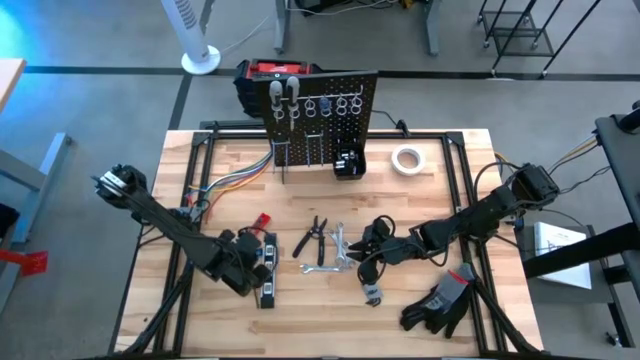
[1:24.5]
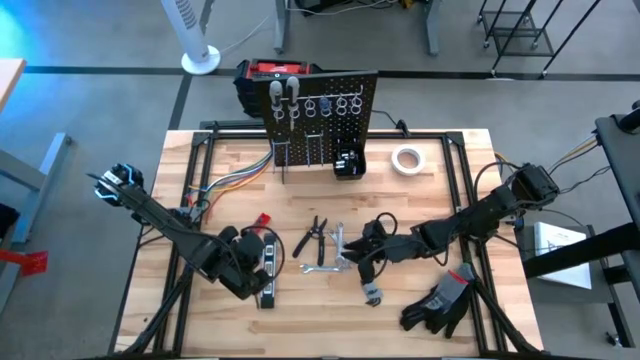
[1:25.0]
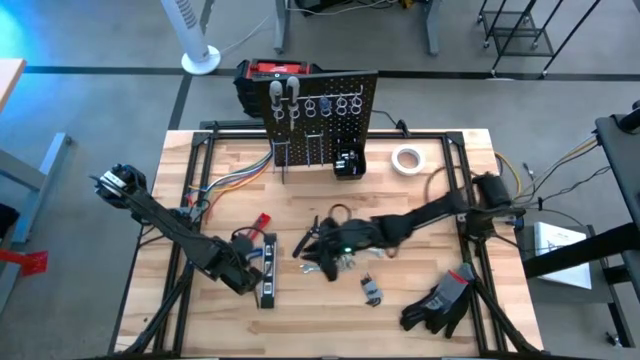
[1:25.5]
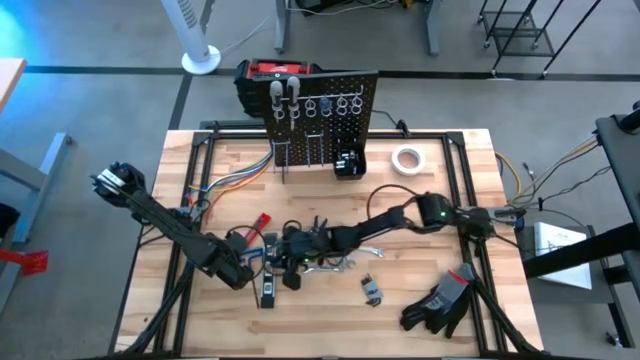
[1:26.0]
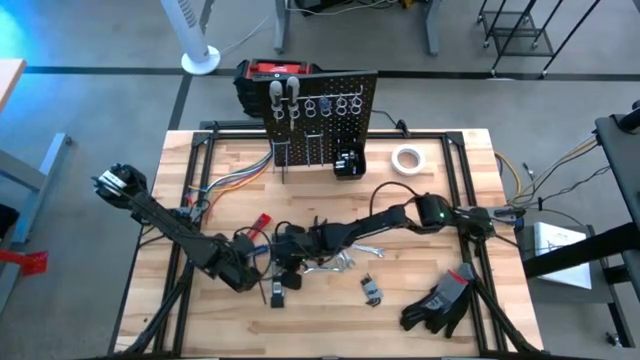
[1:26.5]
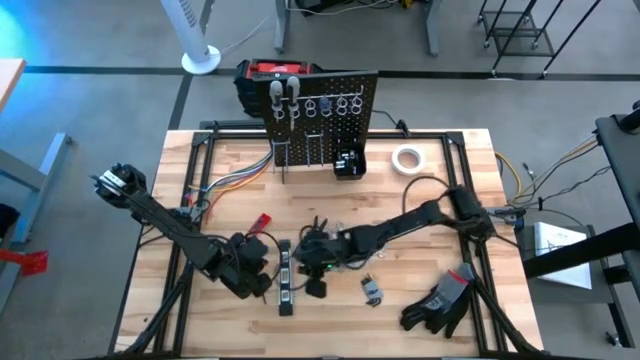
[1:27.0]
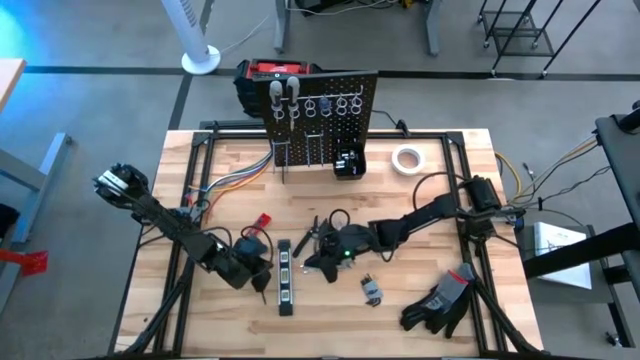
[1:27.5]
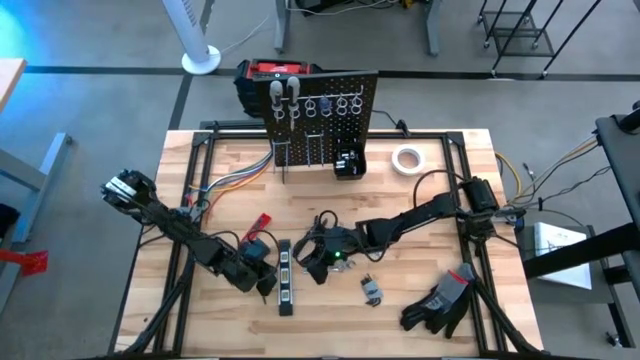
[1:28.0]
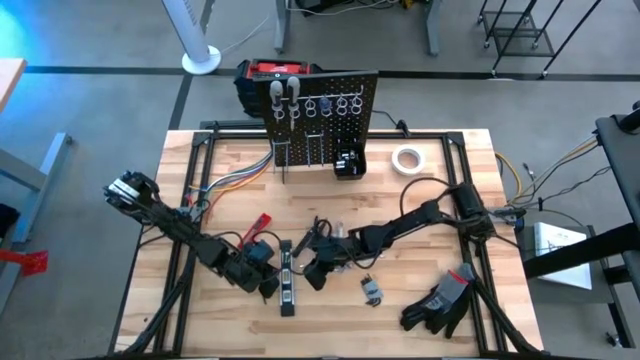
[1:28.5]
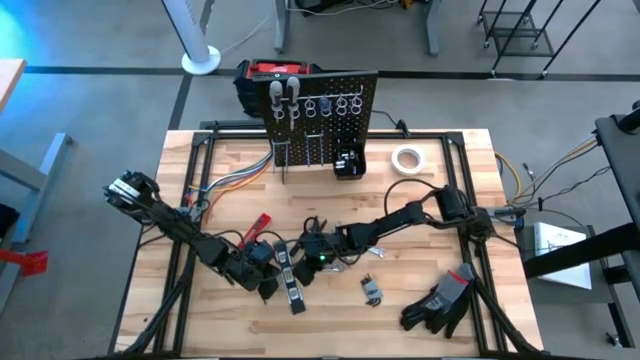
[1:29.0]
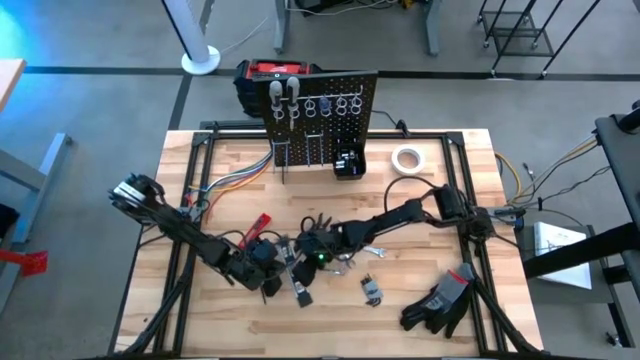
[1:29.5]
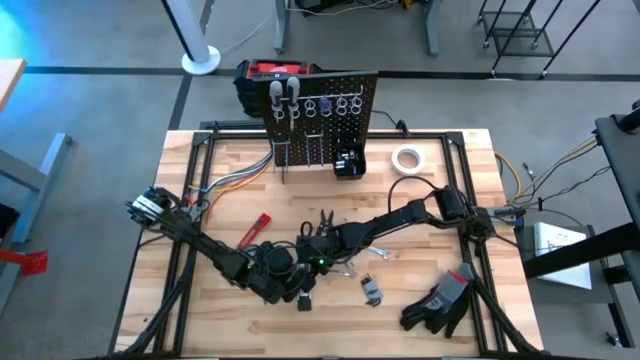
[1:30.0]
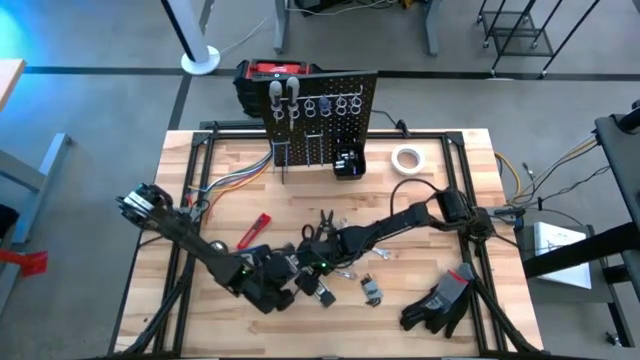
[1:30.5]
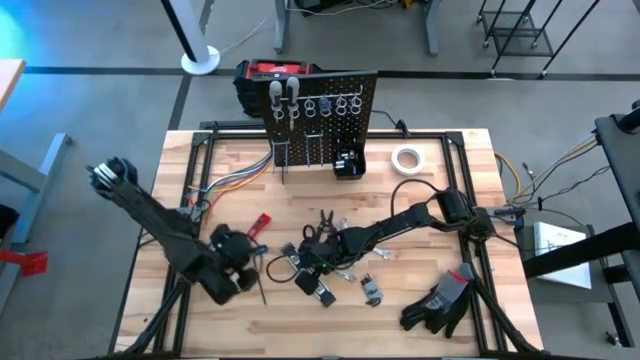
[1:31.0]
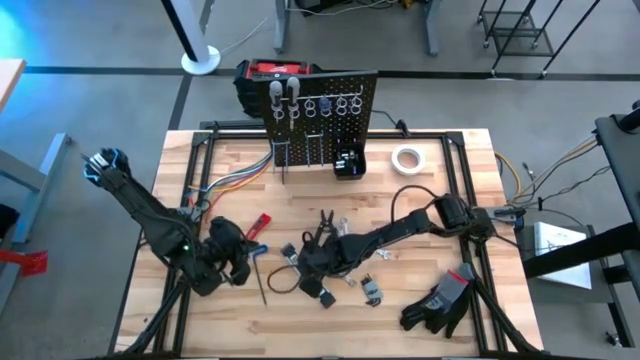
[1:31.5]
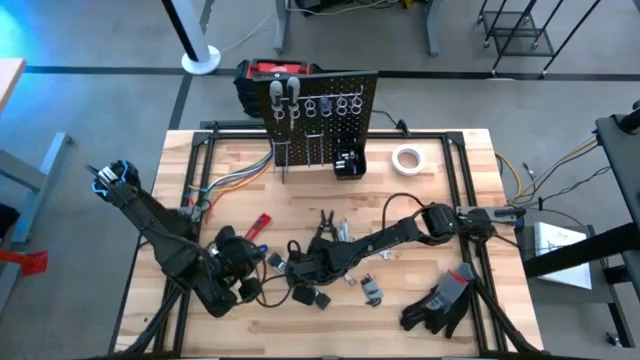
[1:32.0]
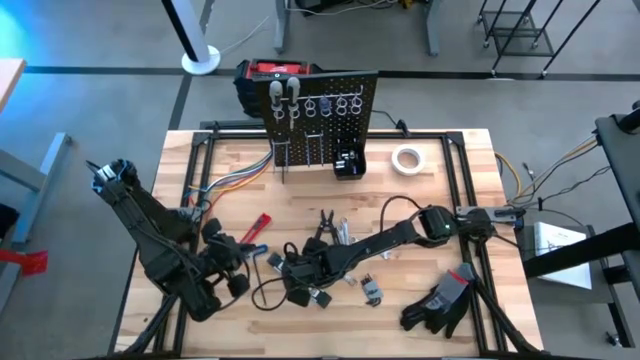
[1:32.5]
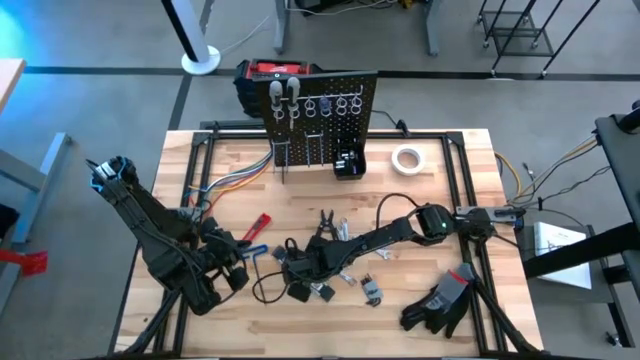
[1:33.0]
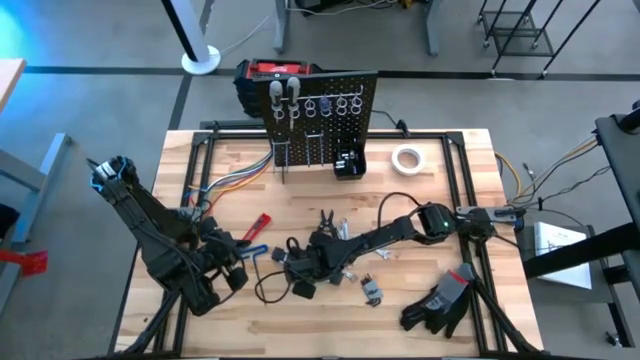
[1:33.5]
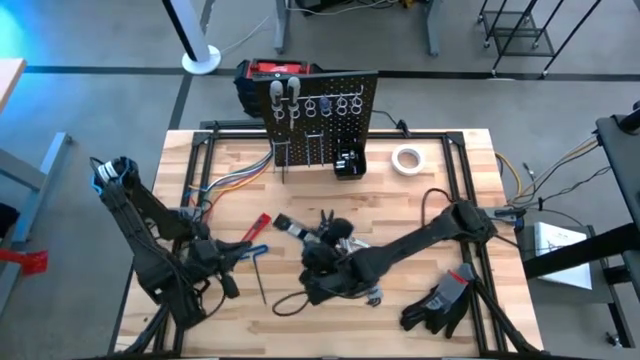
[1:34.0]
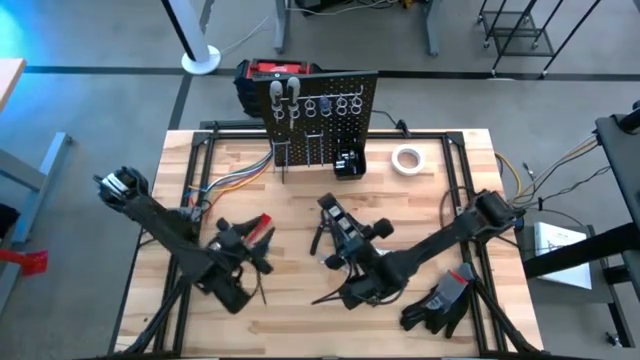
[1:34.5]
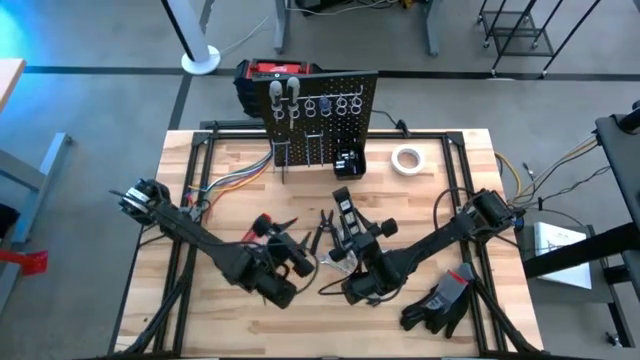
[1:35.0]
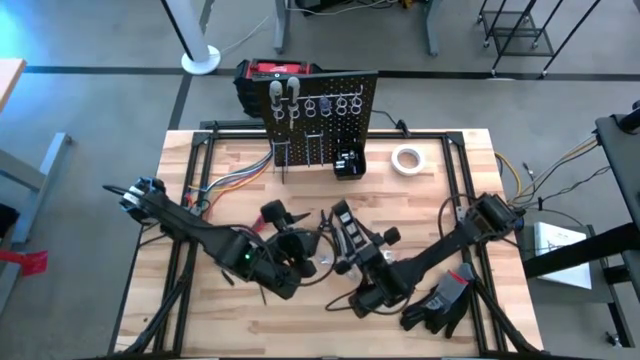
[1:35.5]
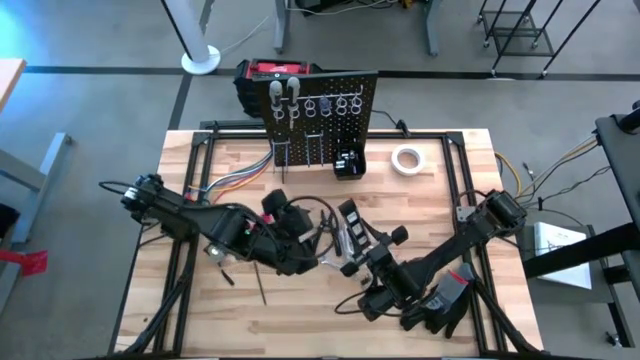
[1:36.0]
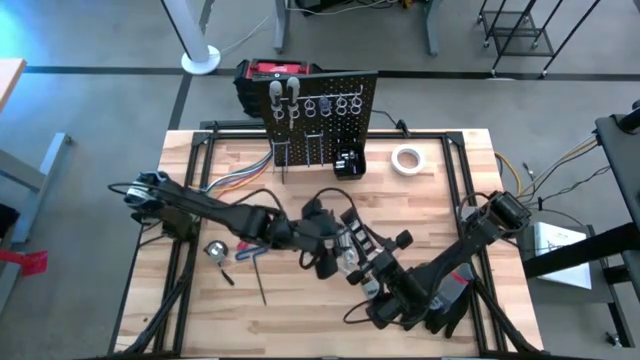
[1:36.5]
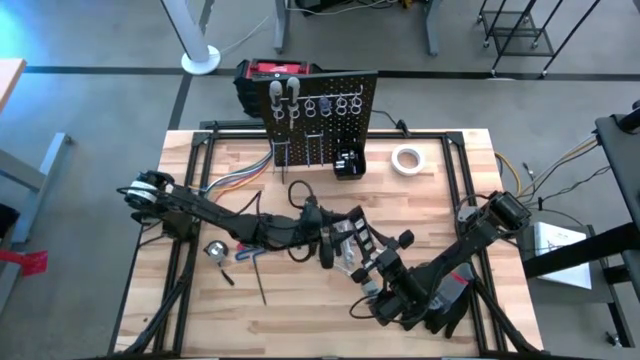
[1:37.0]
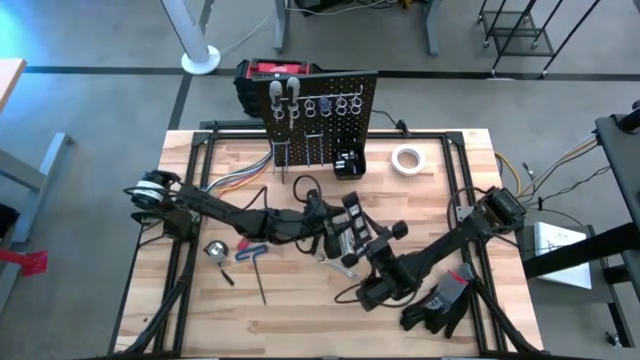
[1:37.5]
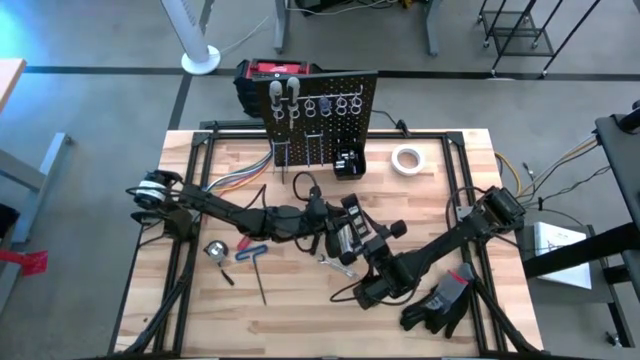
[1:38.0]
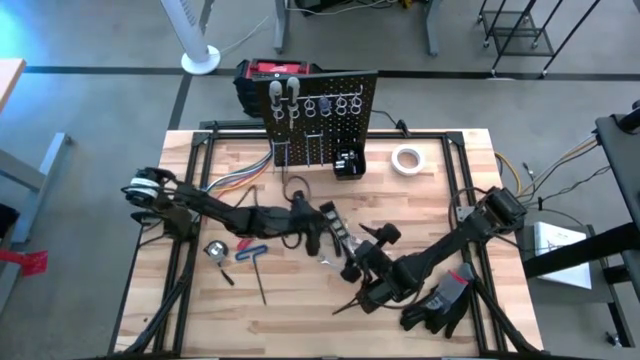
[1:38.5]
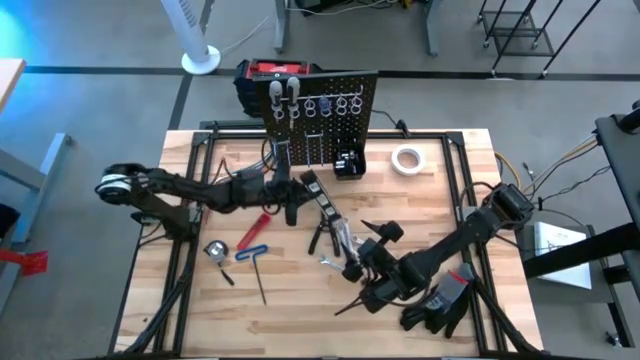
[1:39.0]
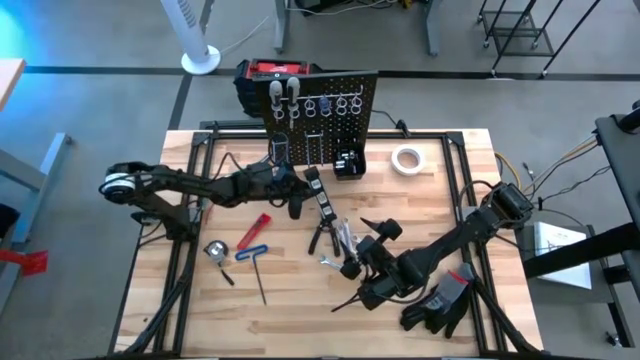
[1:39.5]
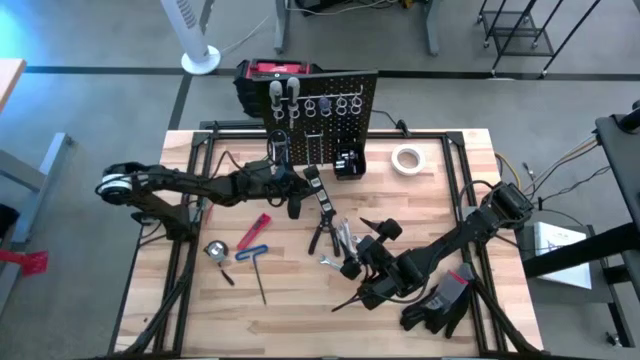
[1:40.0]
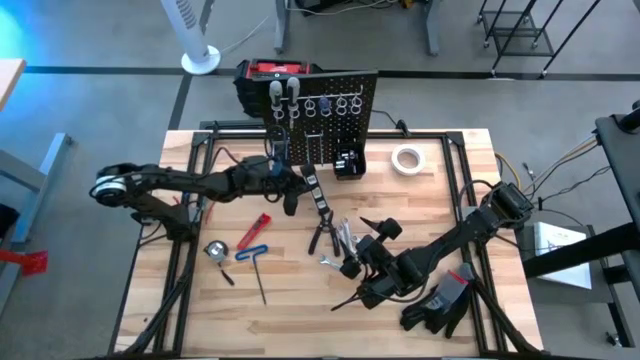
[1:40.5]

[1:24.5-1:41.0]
Task: Hang tools onto peg board
Hang the spirit level on the peg board

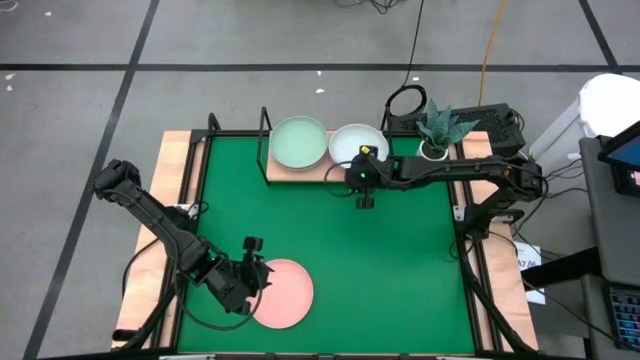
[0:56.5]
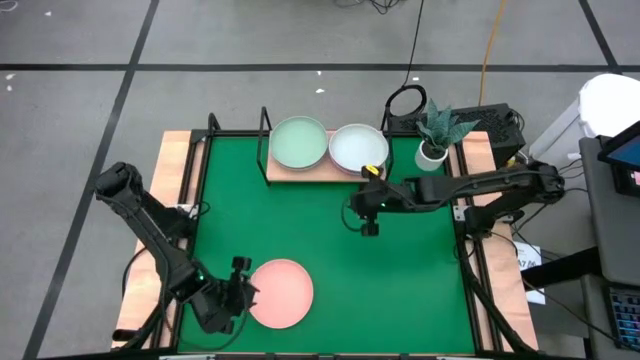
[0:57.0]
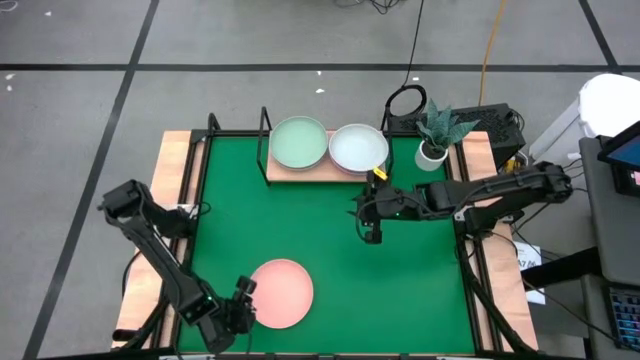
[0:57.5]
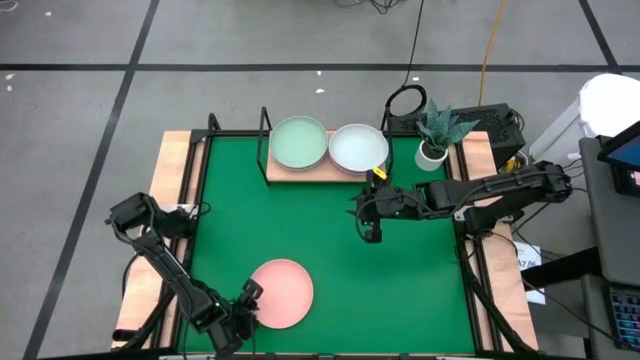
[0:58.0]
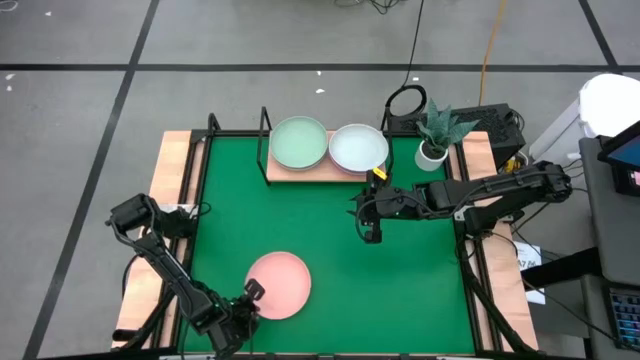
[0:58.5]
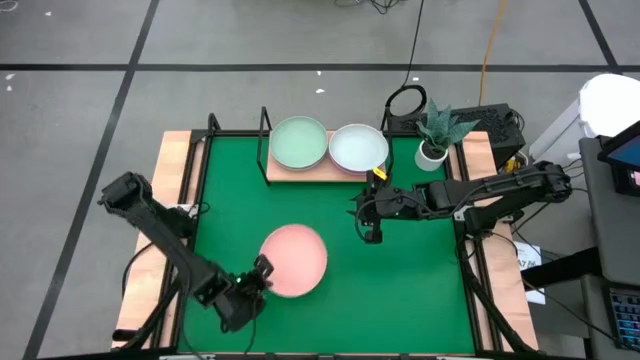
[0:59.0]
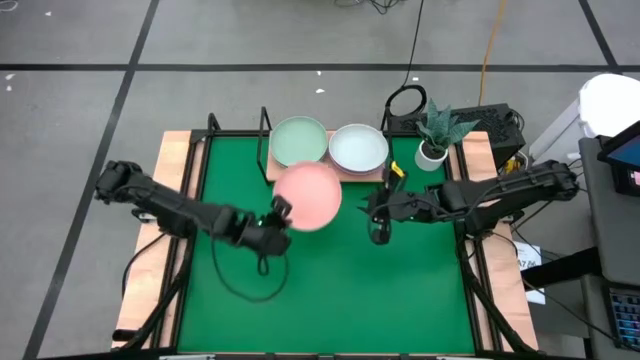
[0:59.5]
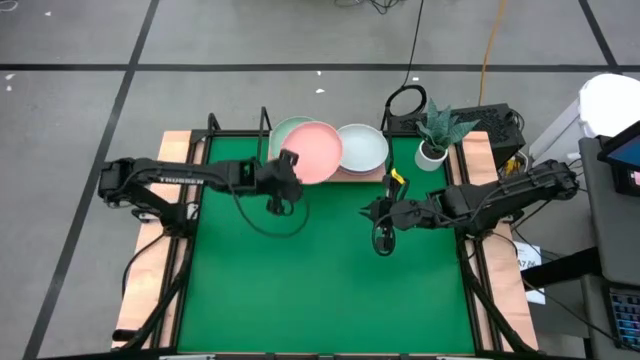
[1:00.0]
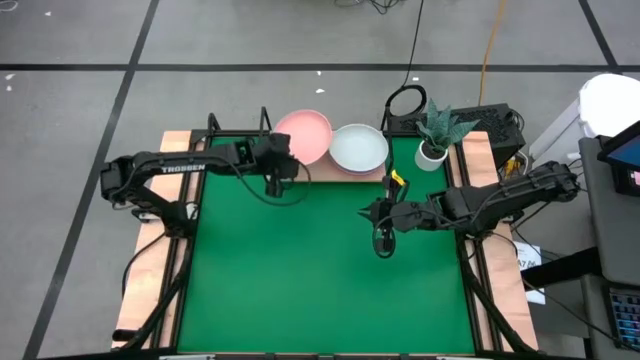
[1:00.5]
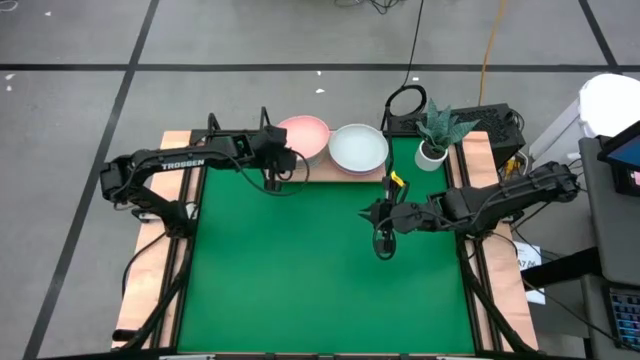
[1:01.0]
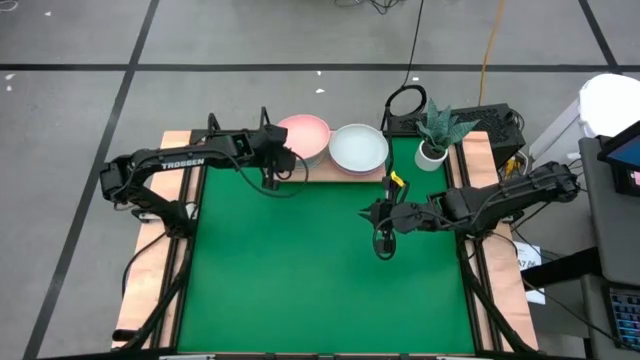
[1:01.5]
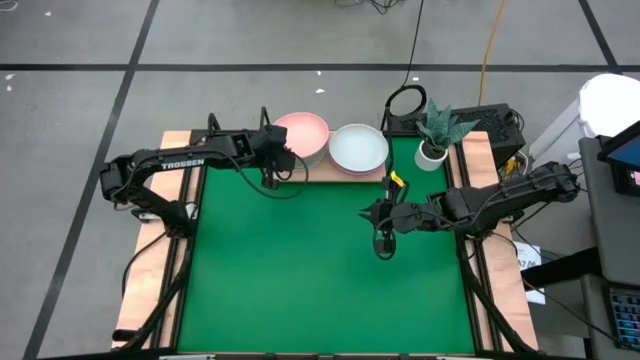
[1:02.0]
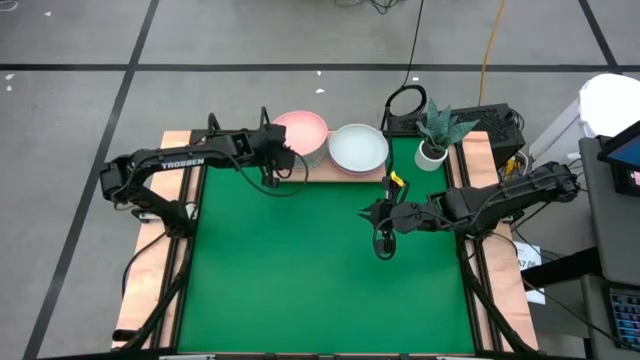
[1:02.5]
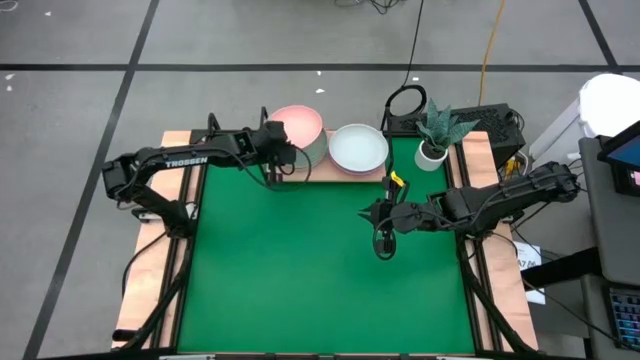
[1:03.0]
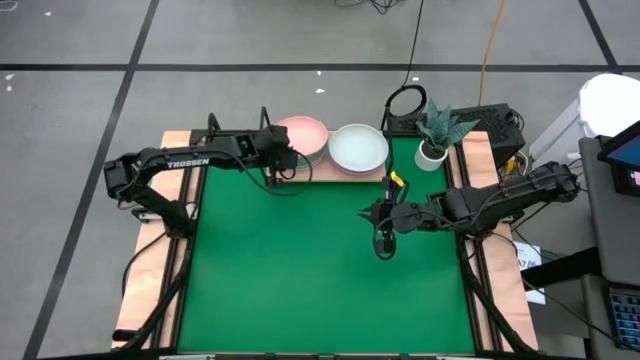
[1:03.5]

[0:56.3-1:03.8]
Task: Place and stack plates onto a shelf
Stack the orange plate on top of the light green plate on the shelf
